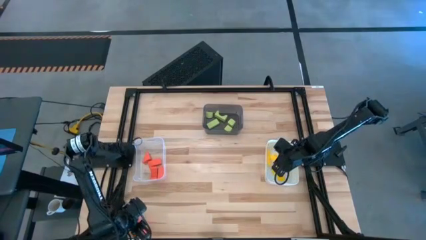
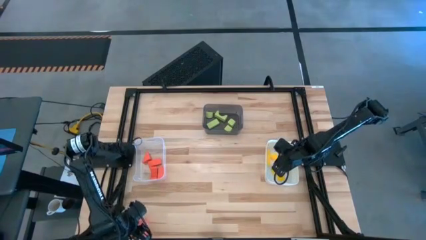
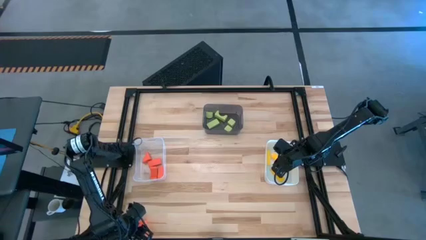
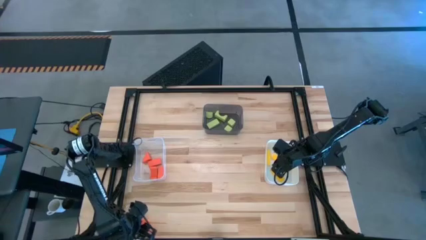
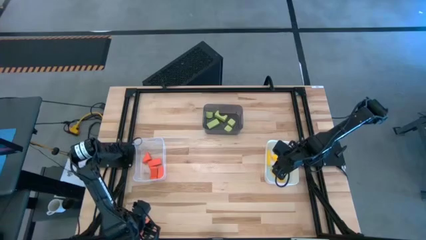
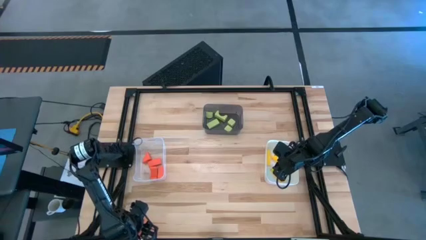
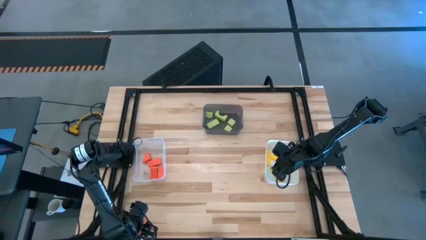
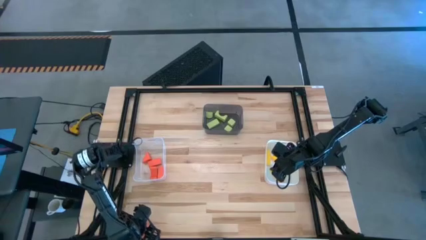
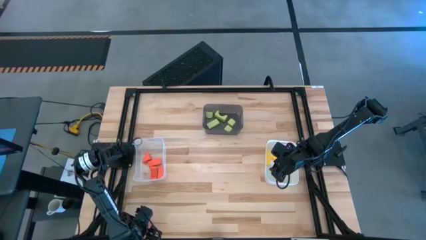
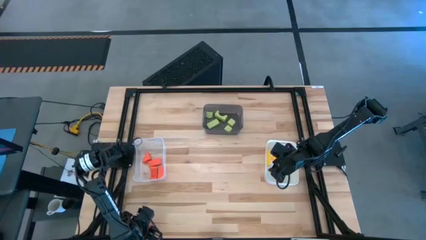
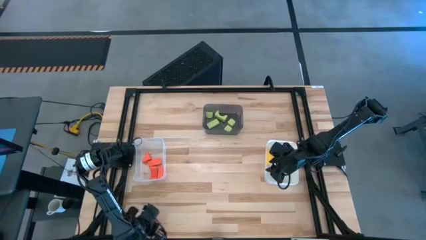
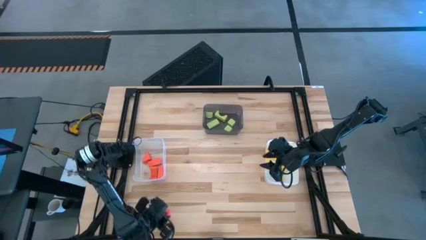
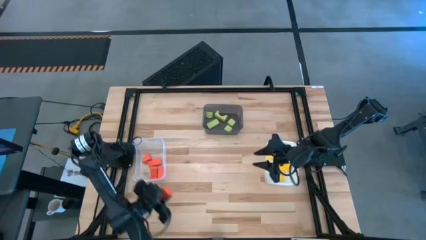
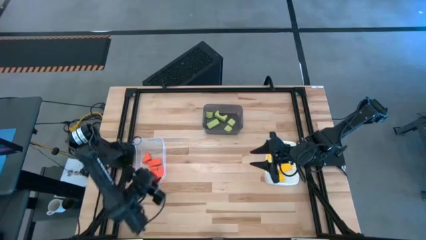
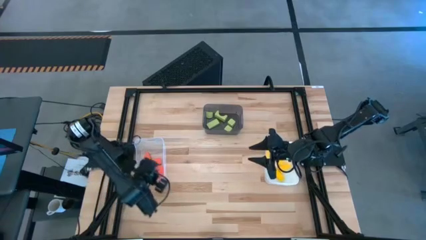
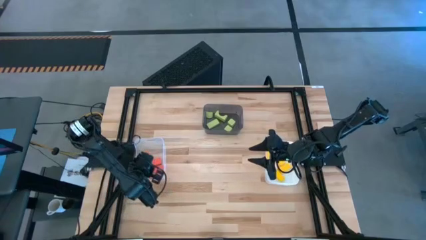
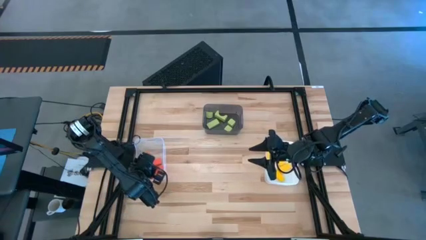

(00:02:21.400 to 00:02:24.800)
Task: Sort & place blocks by color
Put the orange block into the transparent bin

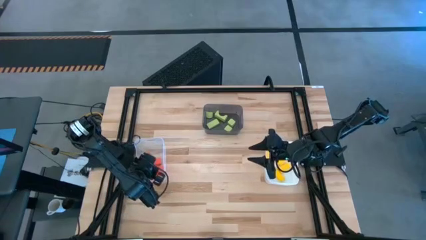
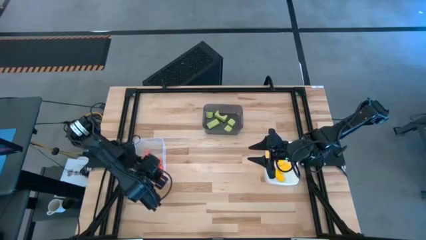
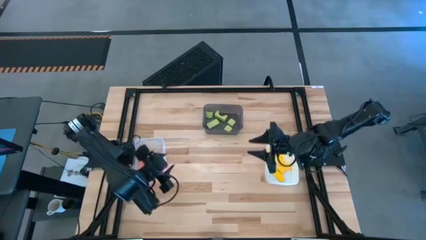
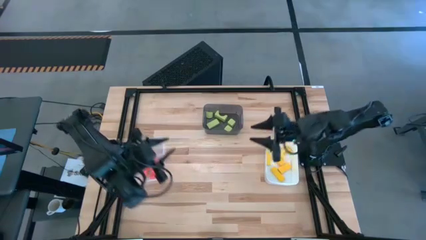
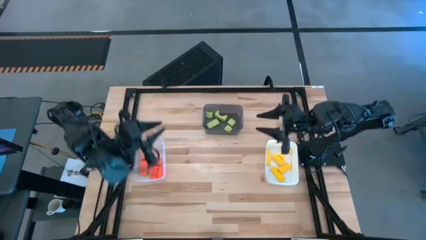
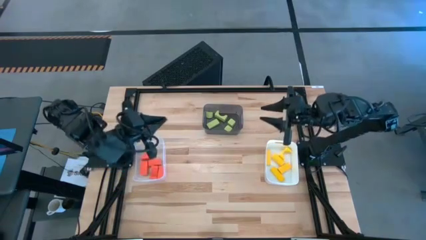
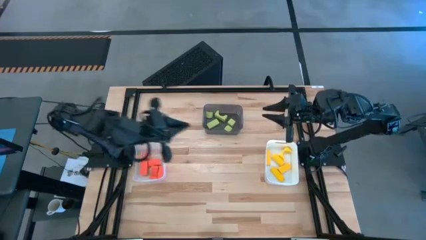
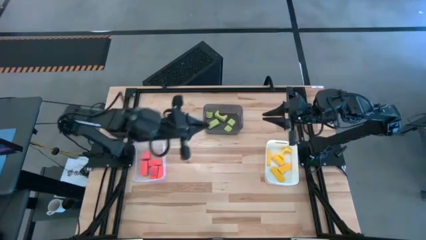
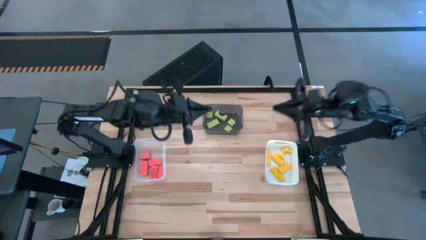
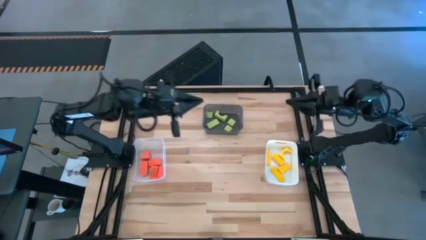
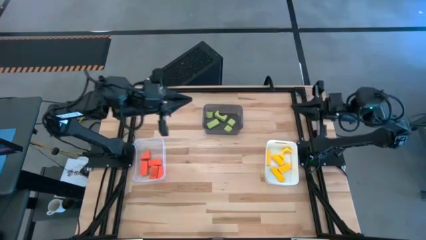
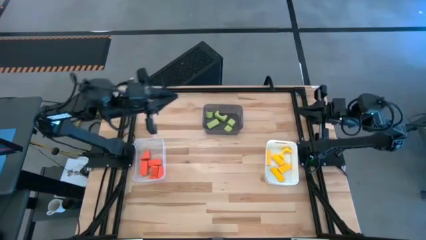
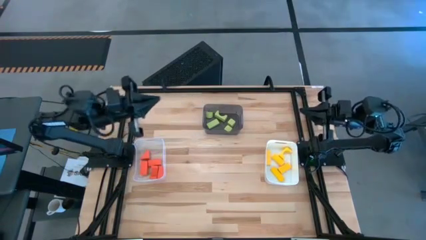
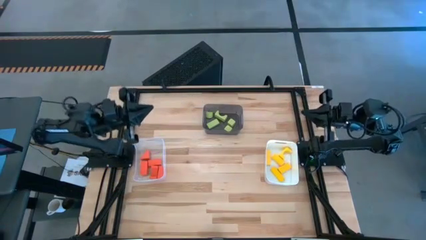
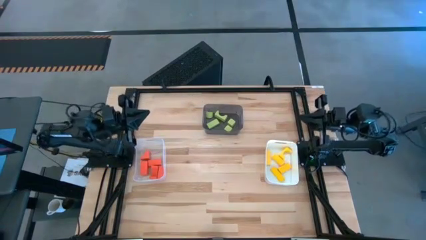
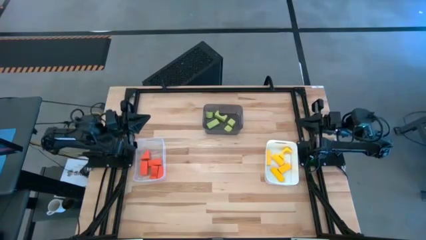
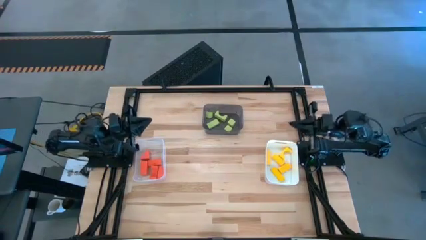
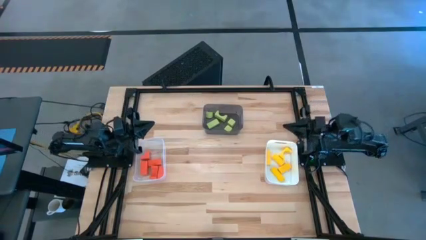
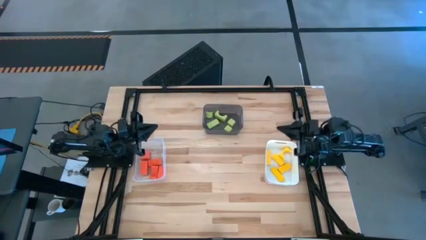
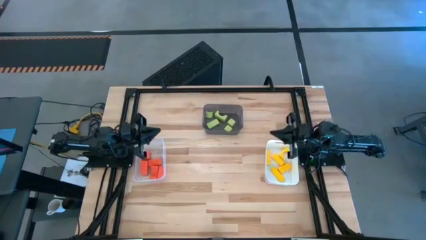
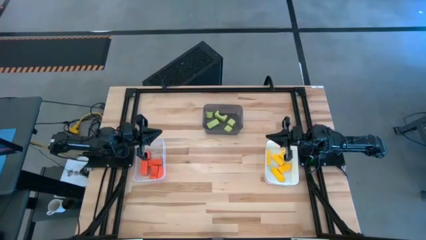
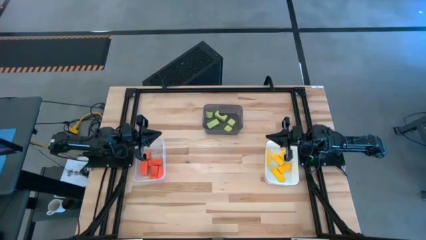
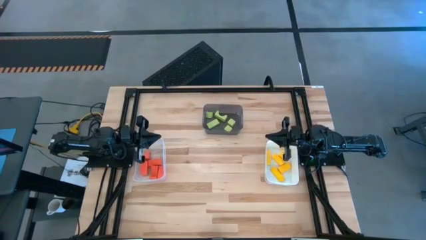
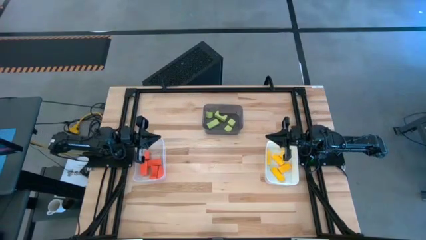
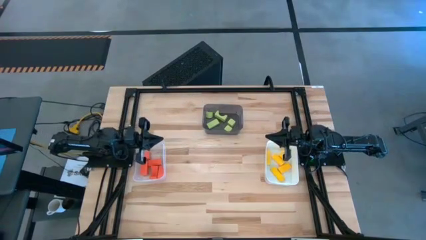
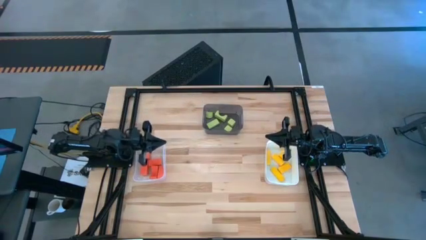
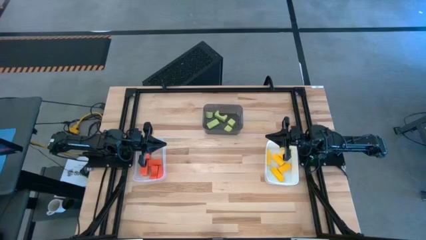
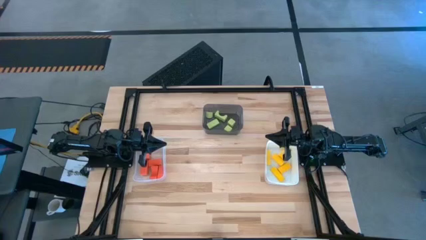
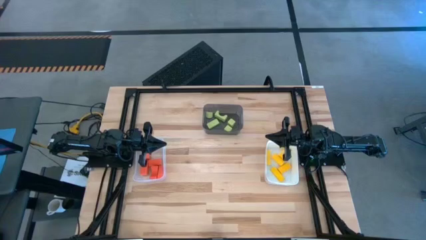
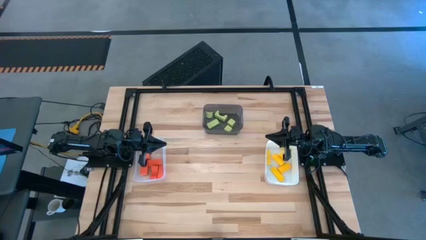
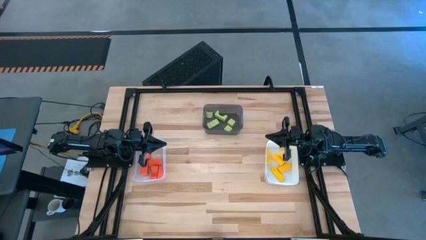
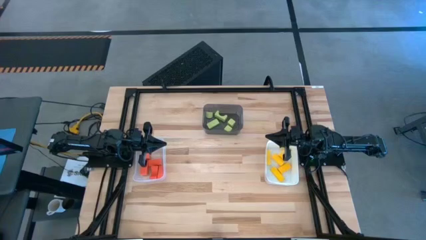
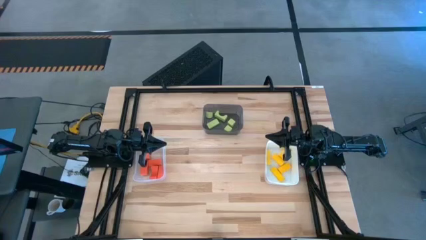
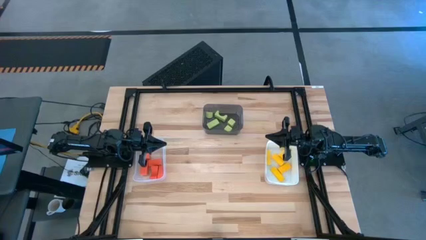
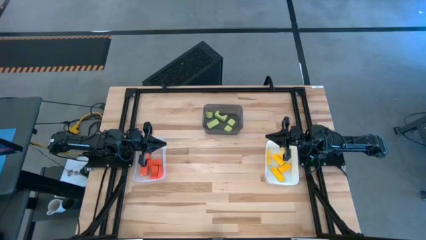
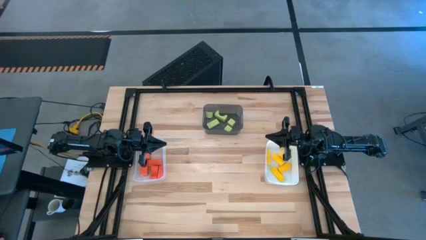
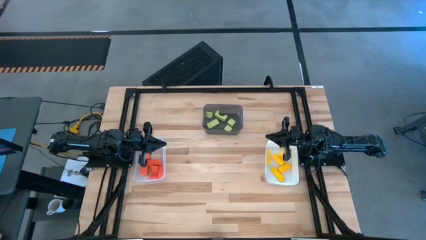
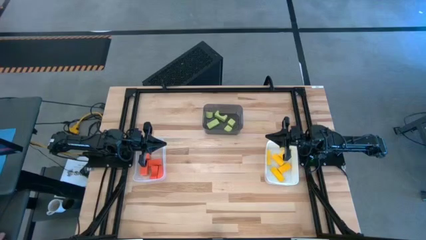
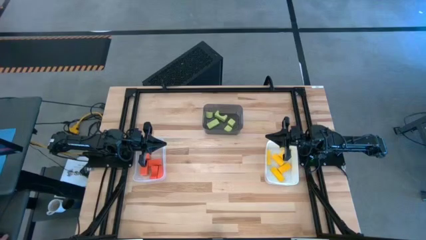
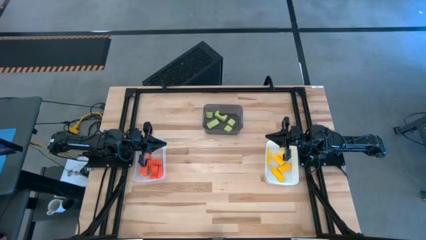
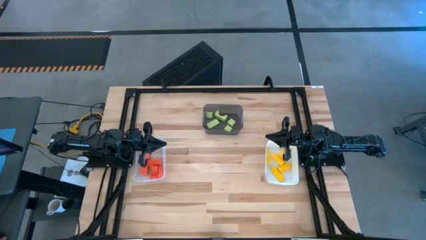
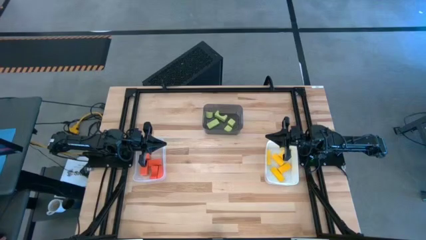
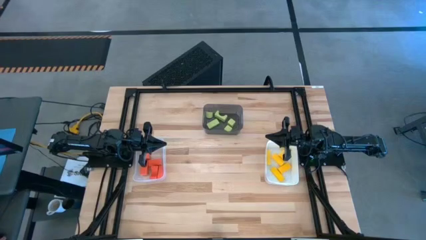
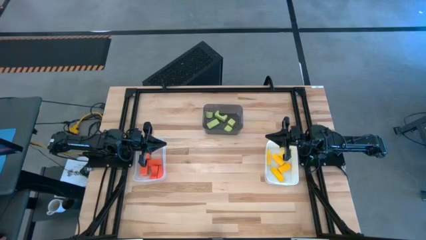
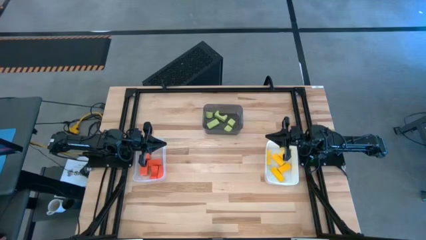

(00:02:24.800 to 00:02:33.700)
Return to Home Position

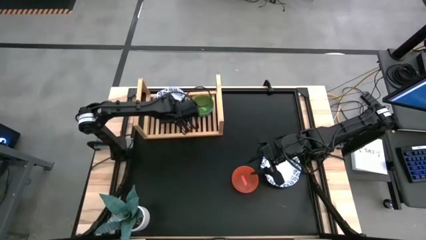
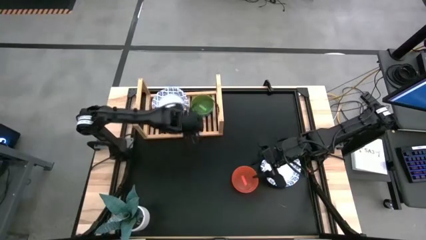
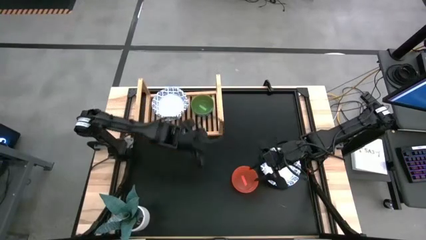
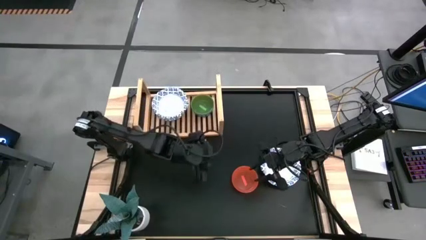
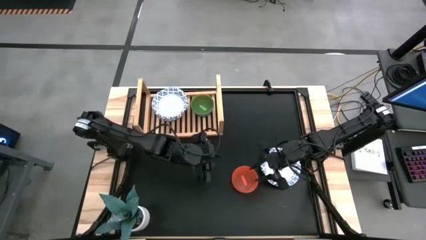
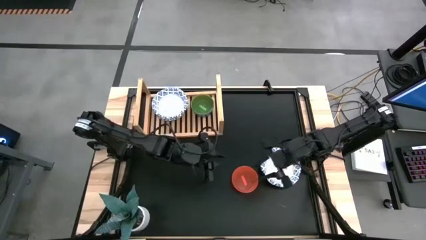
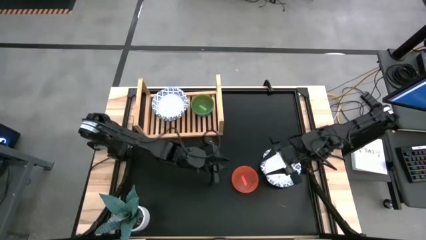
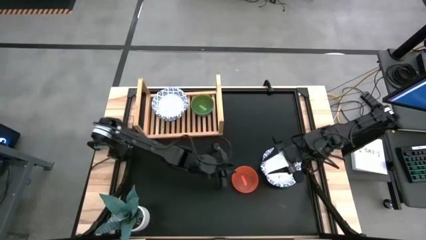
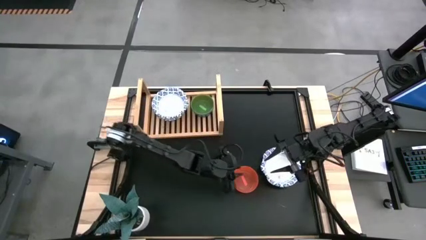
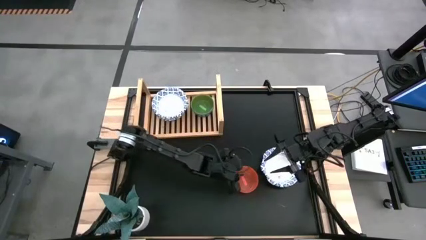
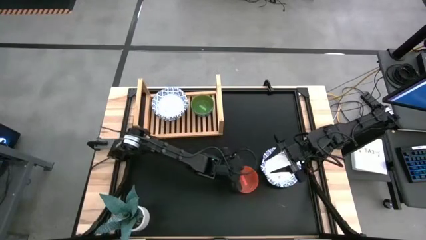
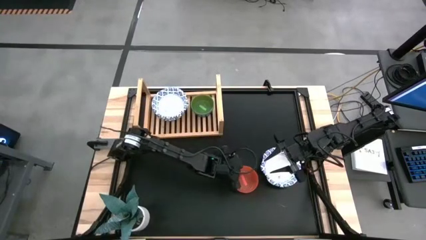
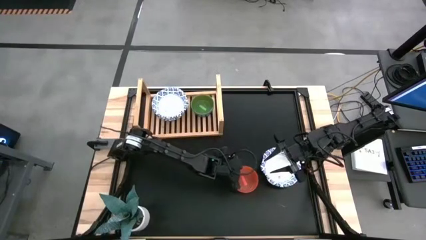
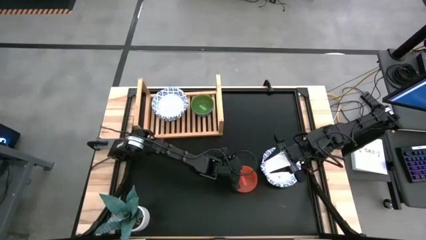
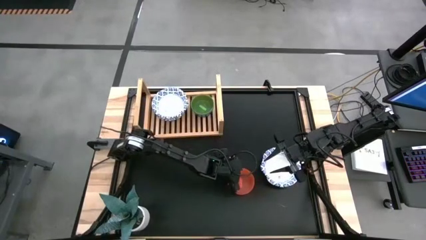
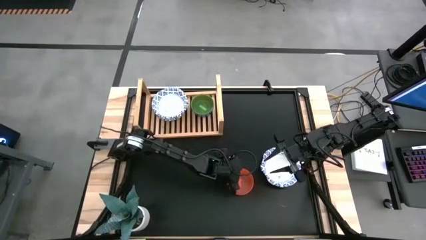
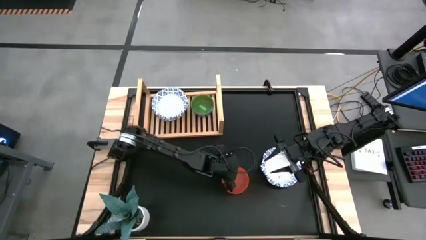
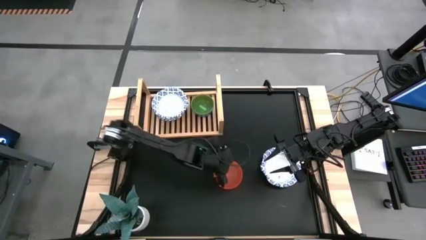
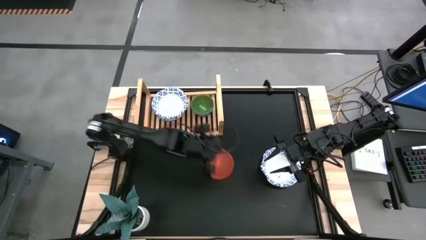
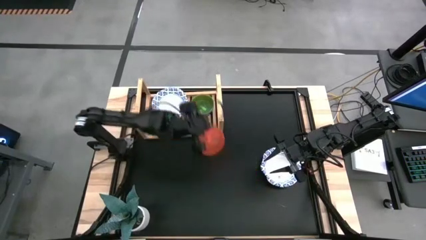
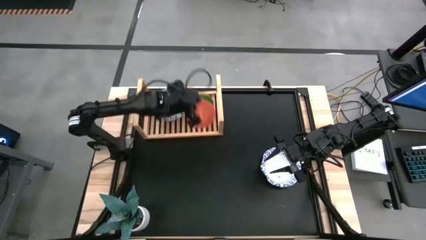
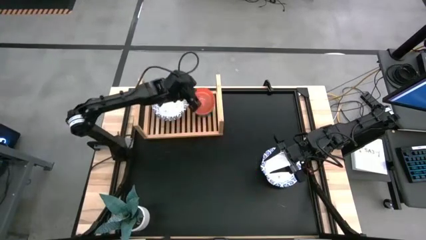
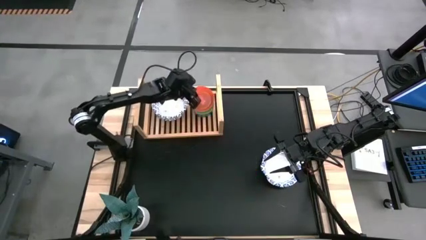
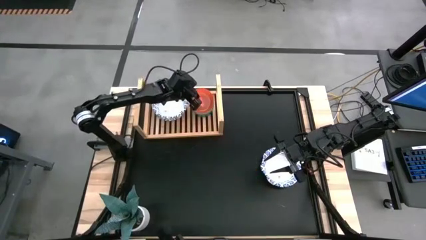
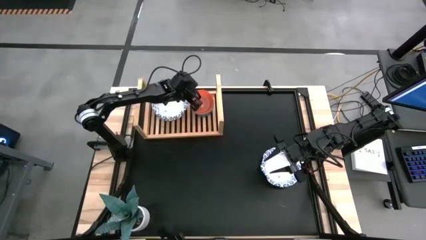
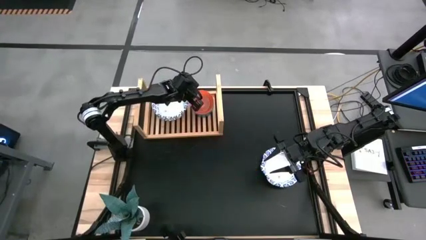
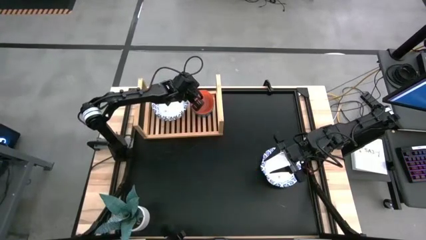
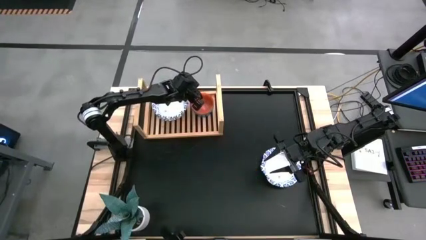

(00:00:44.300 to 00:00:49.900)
Task: Place and stack bowls onto a shelf
Stack the orange bowl on top of the green bowl on the shelf
